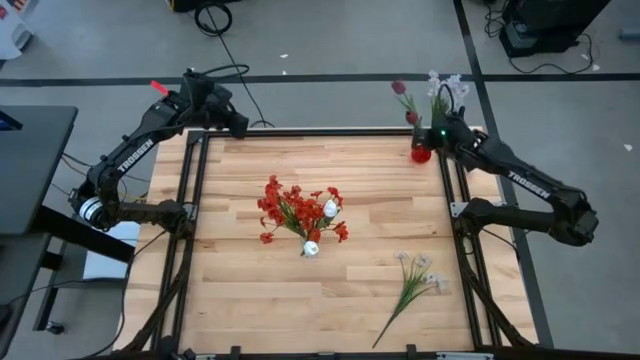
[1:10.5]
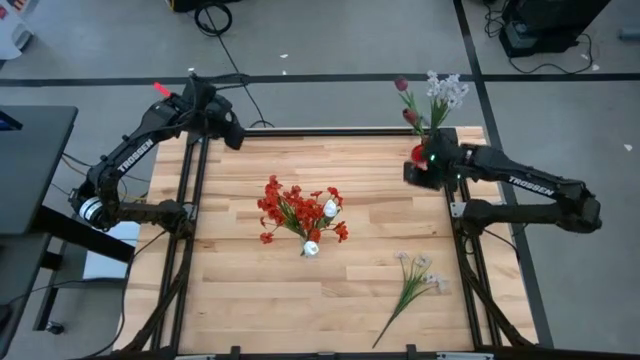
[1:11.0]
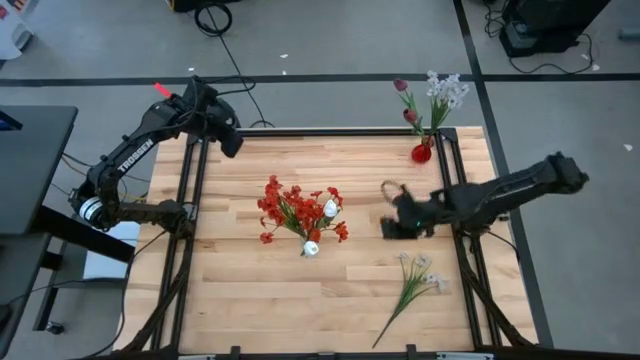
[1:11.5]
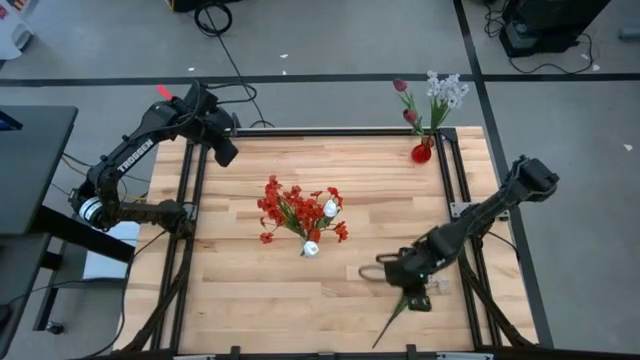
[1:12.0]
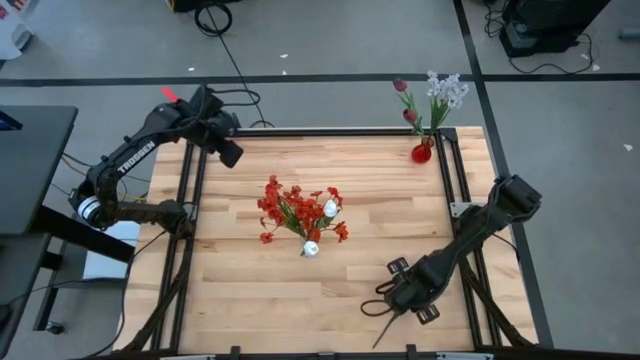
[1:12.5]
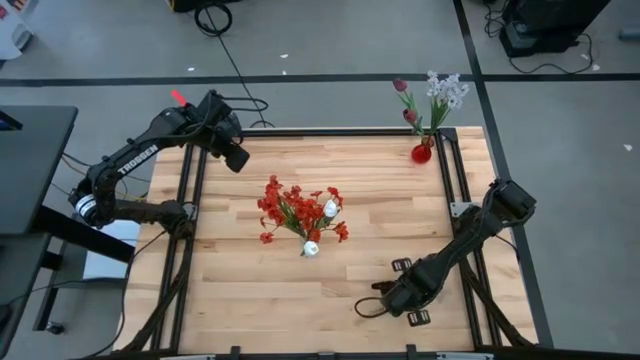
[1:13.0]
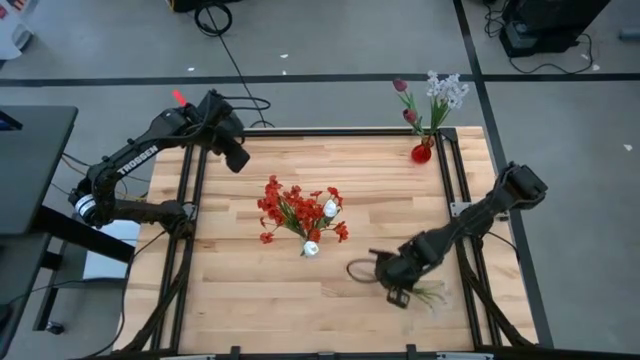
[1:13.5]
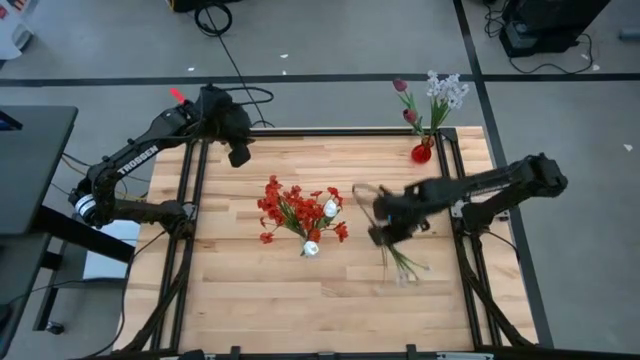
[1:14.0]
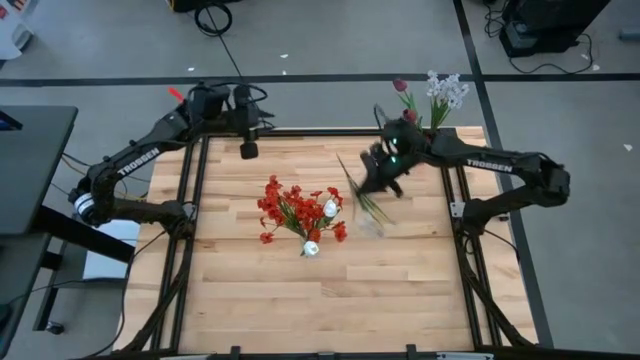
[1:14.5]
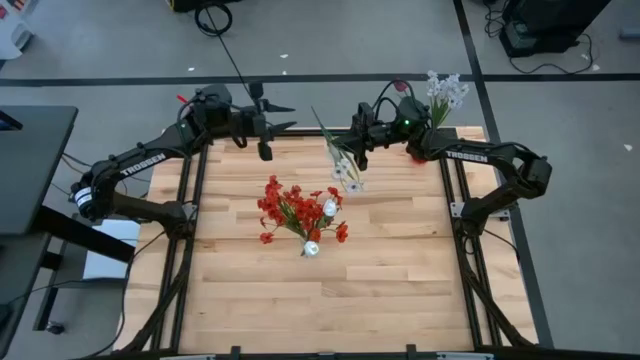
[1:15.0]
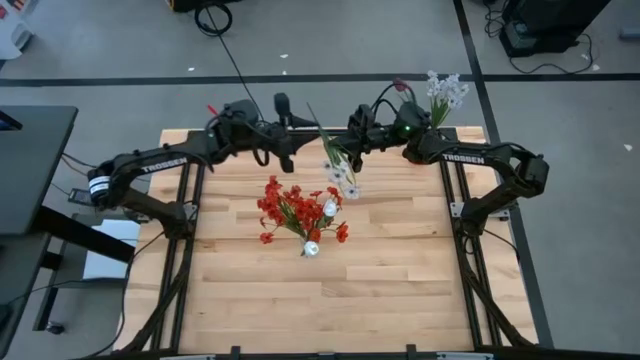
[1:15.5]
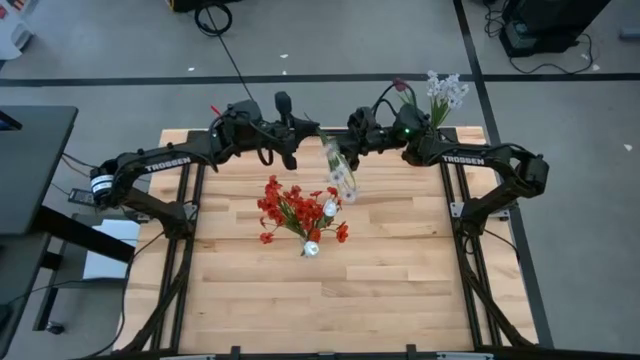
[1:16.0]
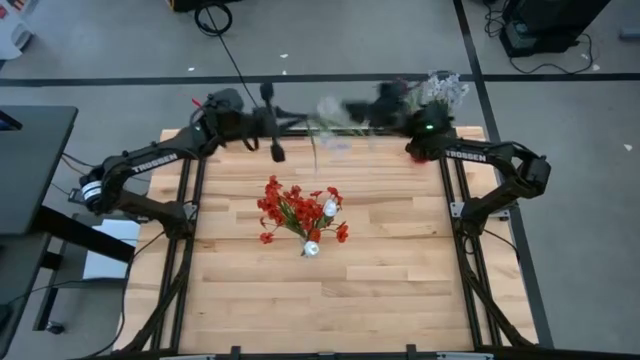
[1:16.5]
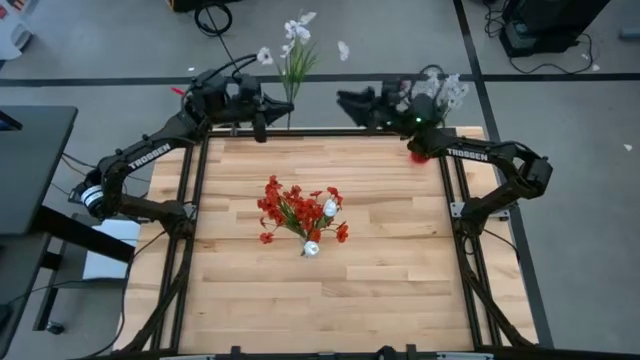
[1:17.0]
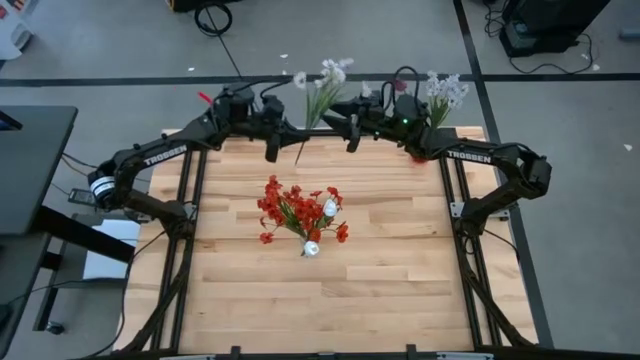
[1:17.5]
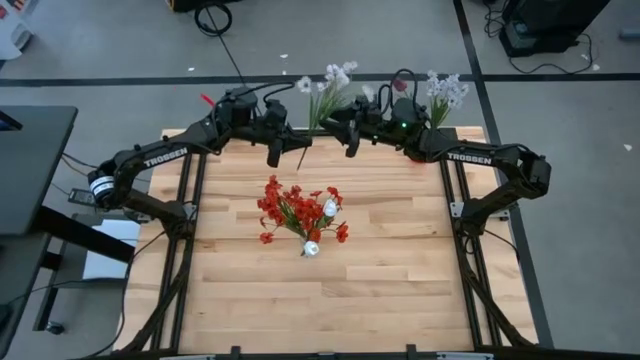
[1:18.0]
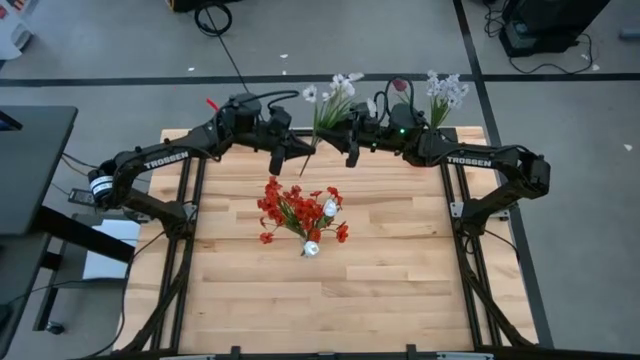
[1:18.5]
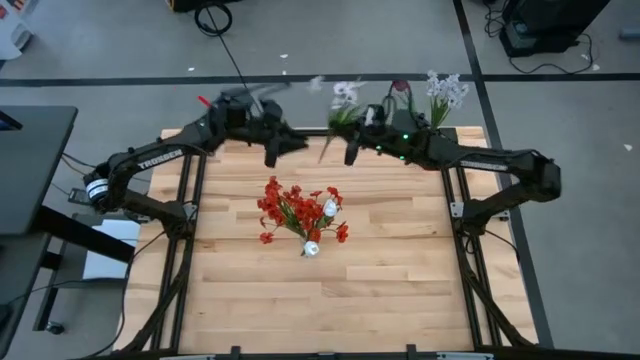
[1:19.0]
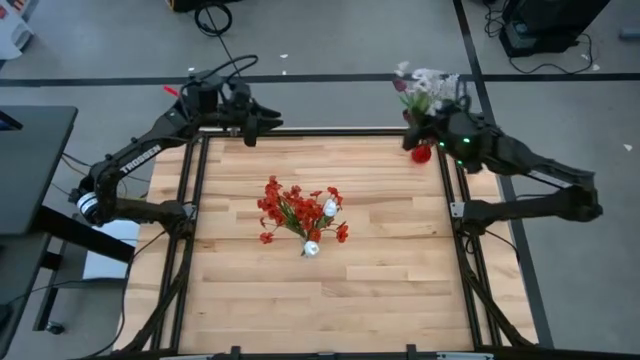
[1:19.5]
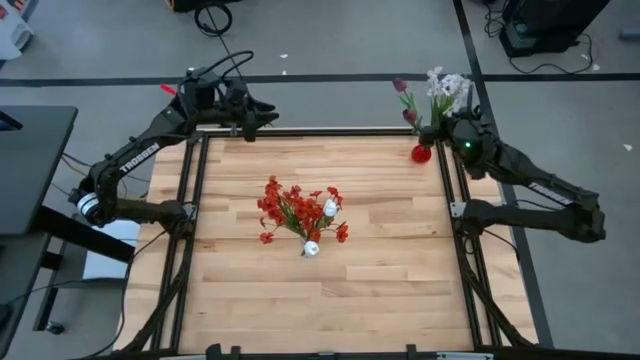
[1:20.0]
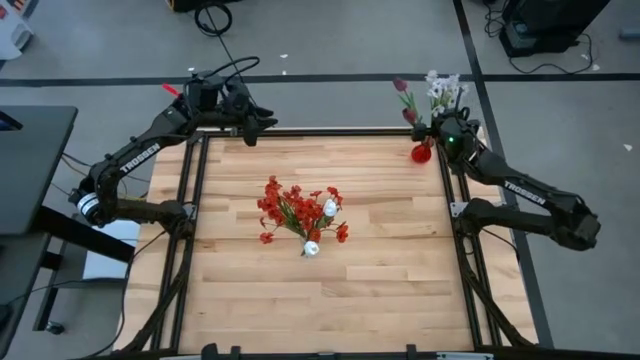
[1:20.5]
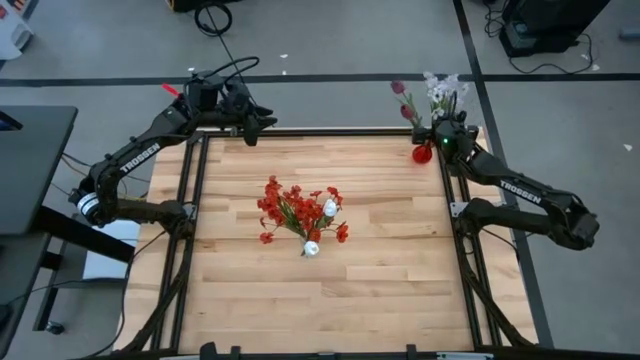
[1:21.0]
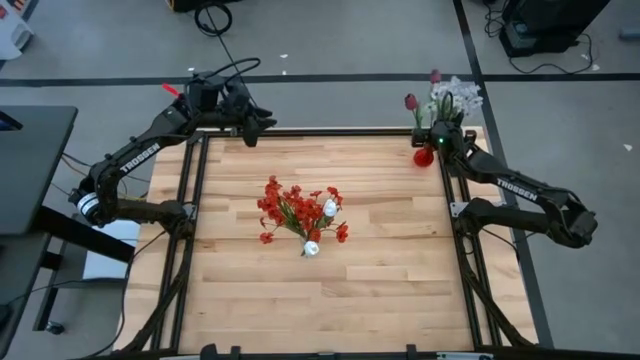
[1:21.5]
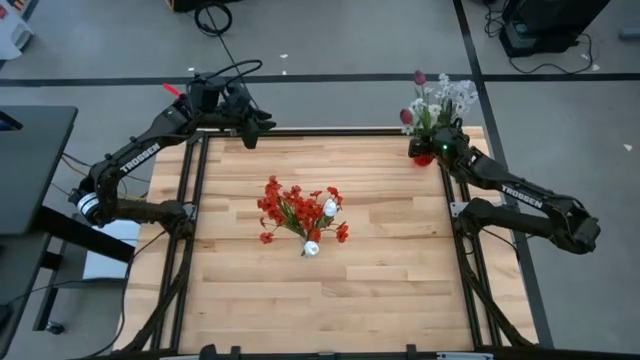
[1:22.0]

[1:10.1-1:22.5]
Task: Sort flowers into vase by color
Put the white flowers into the red vase

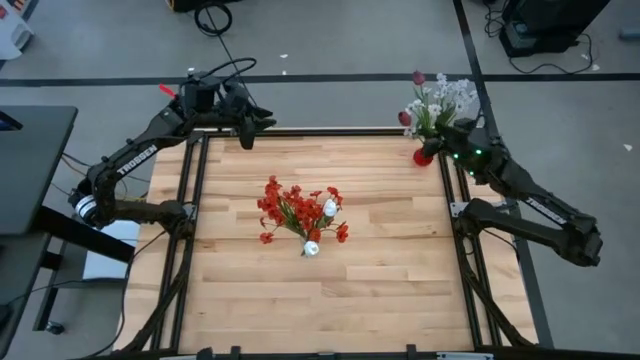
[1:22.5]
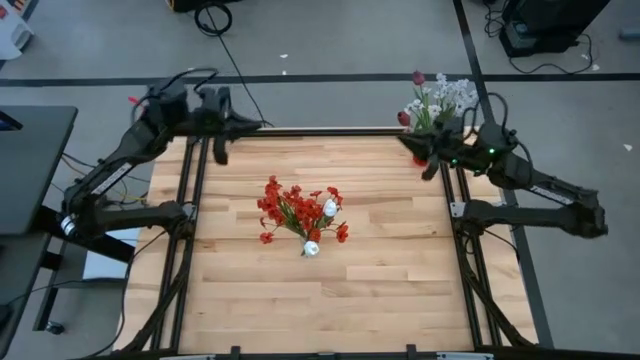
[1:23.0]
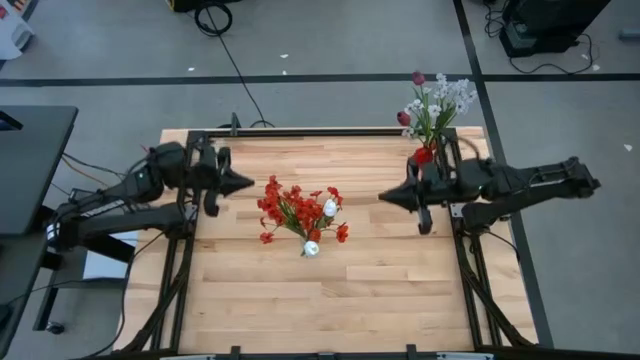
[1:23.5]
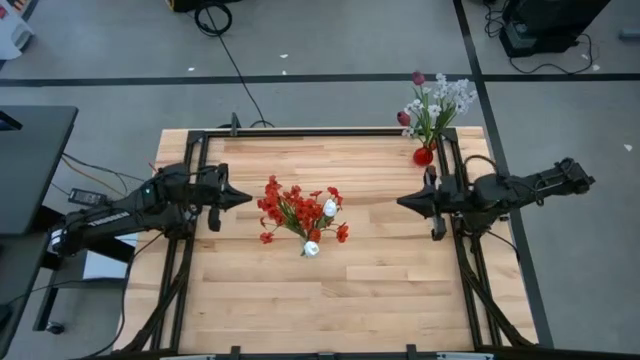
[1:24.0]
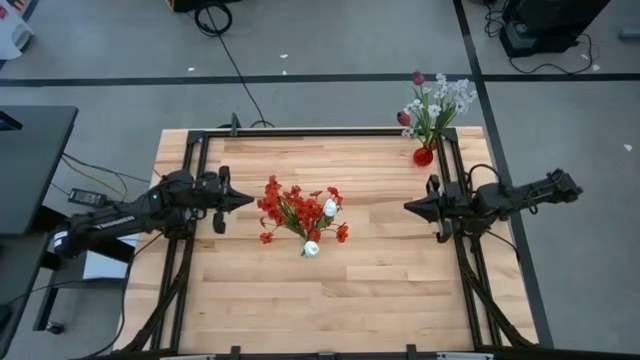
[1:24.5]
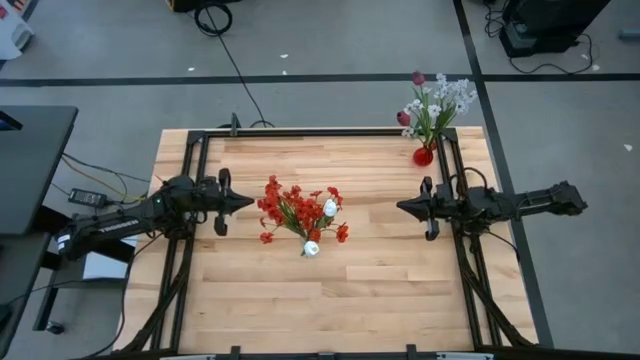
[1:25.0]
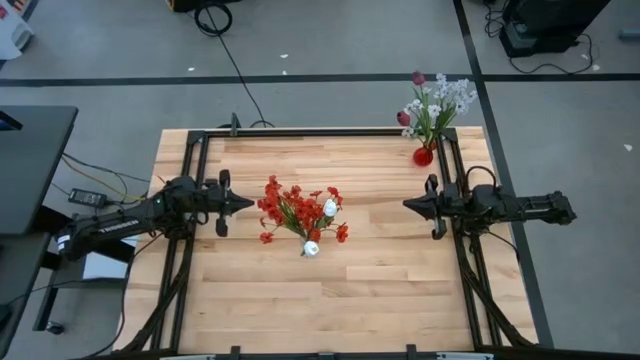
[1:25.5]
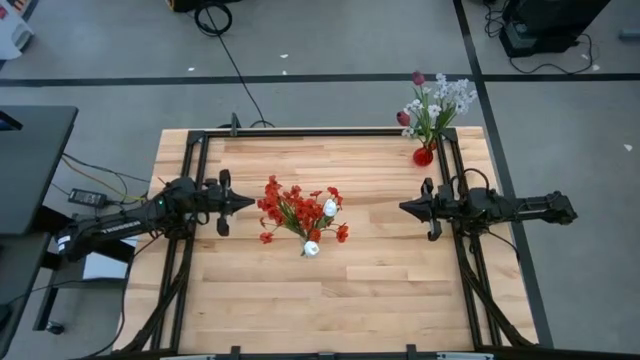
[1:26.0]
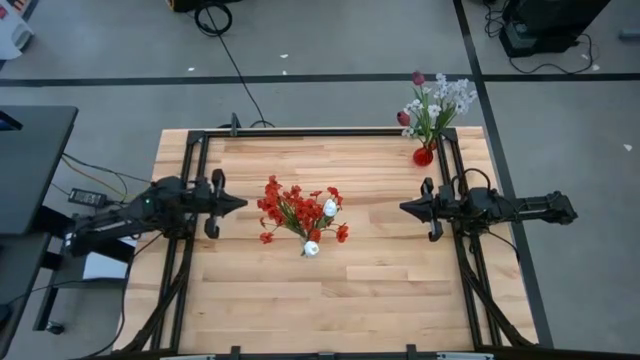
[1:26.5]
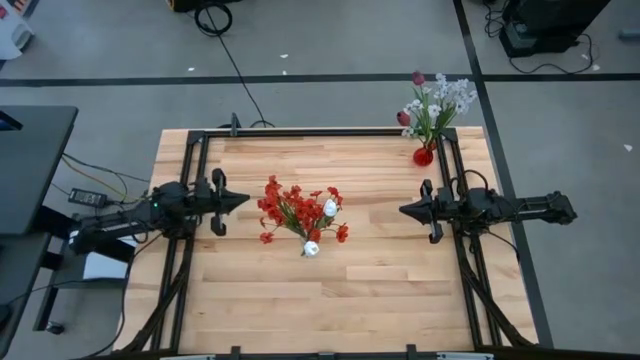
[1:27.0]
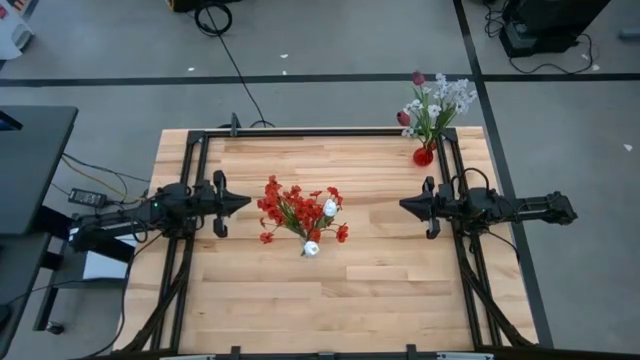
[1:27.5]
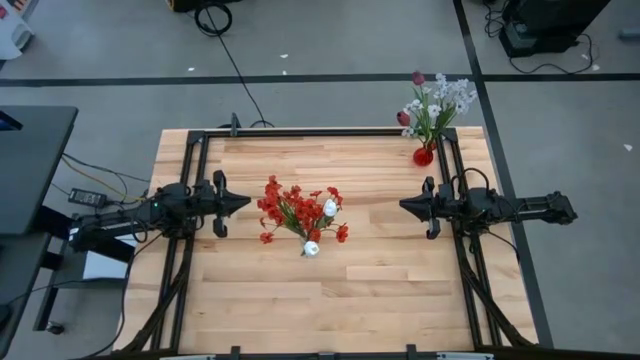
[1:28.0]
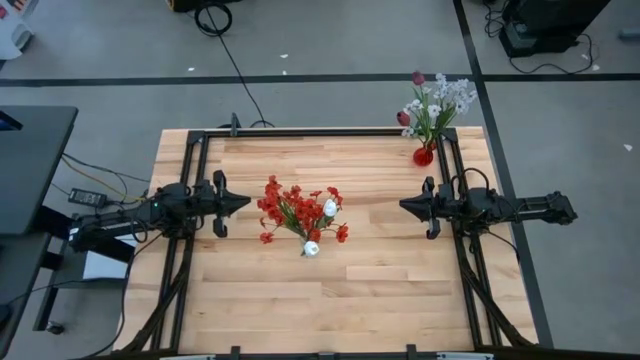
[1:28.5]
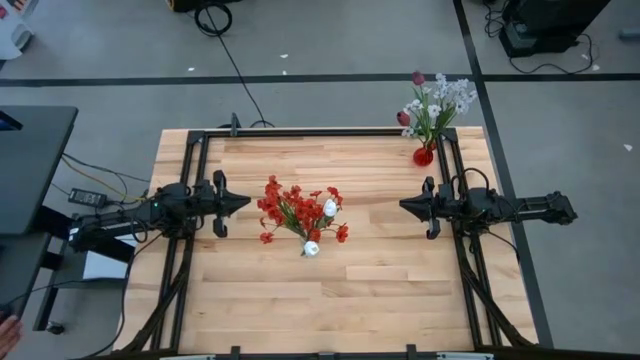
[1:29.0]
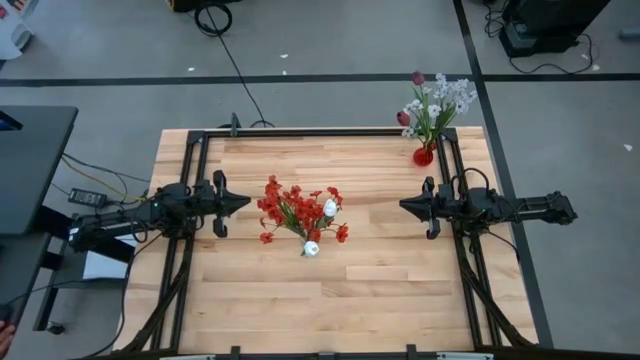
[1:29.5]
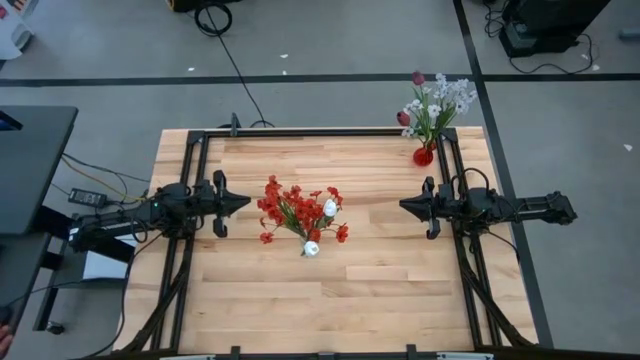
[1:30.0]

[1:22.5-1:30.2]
Return to Home Position

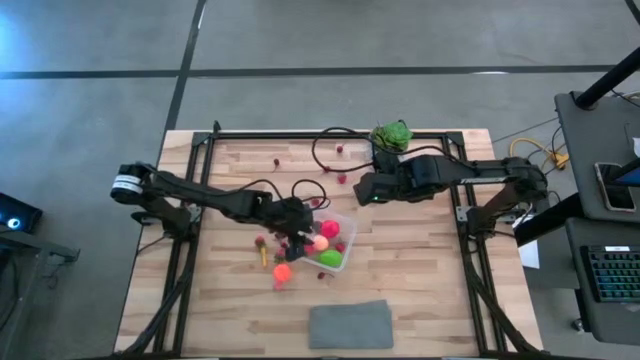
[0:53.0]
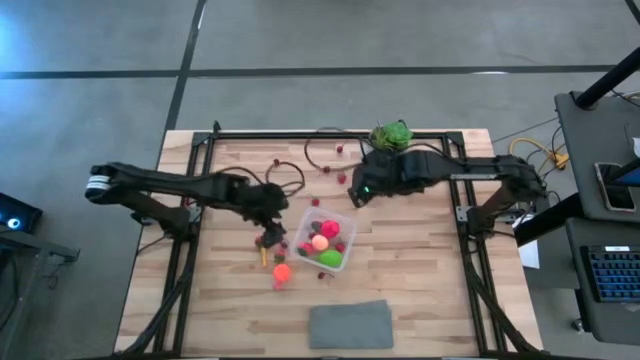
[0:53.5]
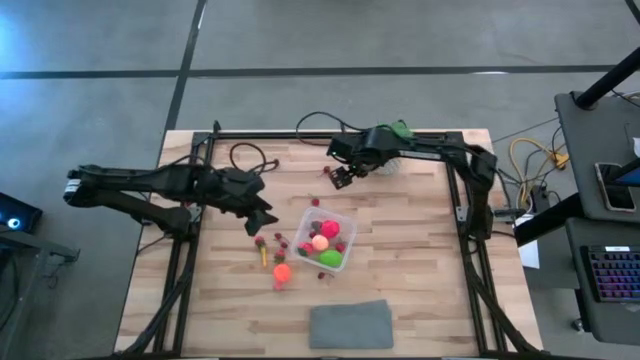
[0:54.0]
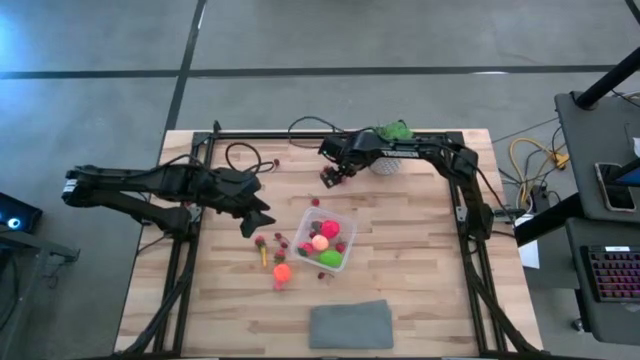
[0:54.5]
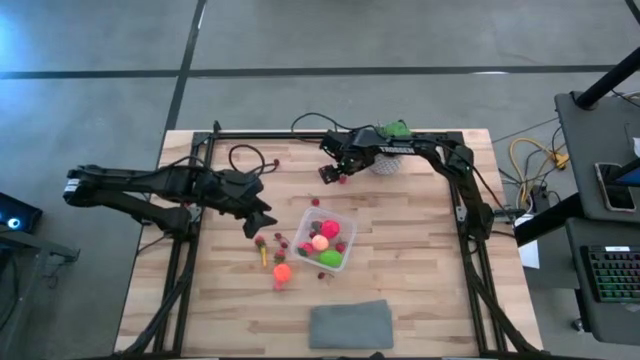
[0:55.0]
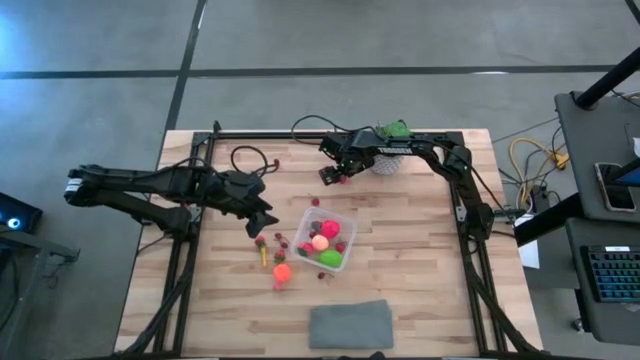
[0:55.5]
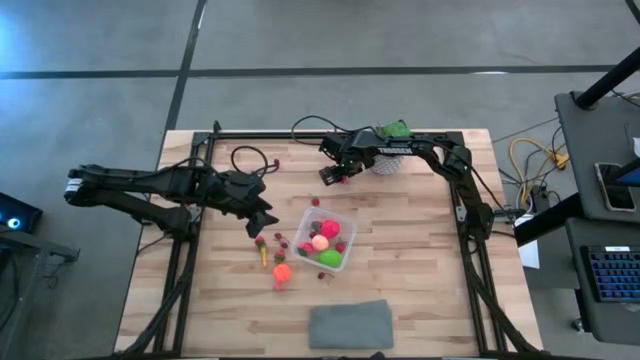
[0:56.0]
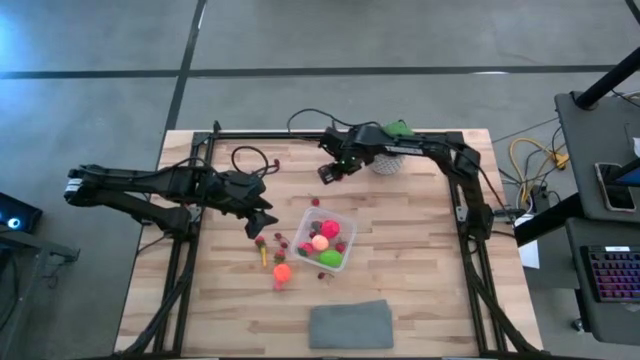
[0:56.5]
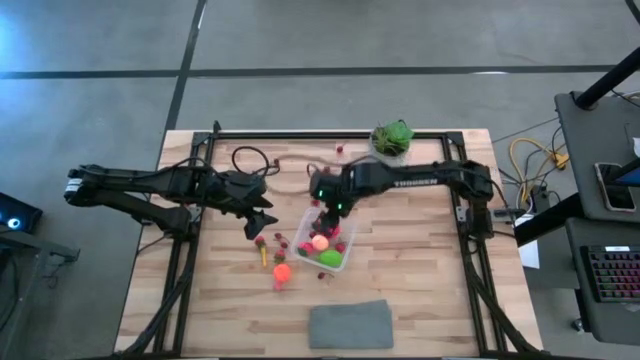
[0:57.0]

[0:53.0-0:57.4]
Task: Pick and placing Produce into tupperware
Put the red strawberry into the transparent container
